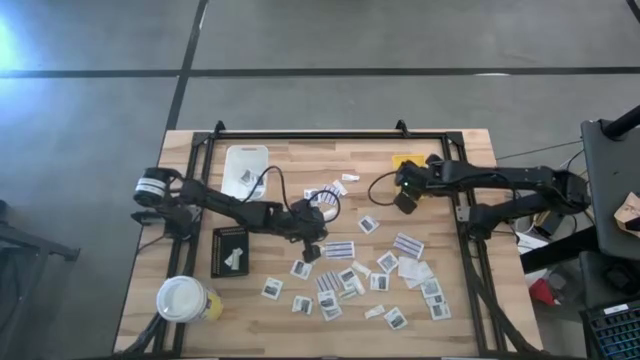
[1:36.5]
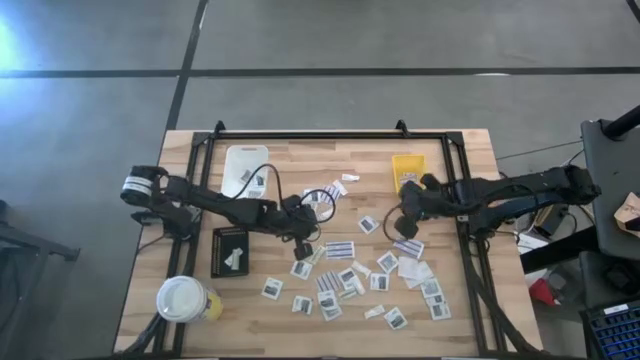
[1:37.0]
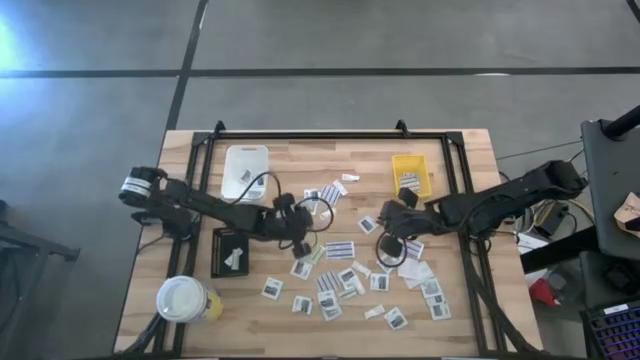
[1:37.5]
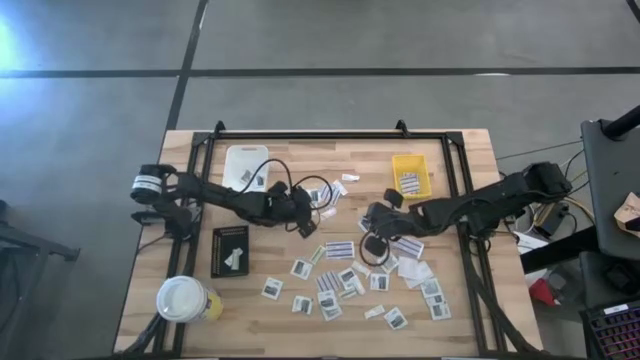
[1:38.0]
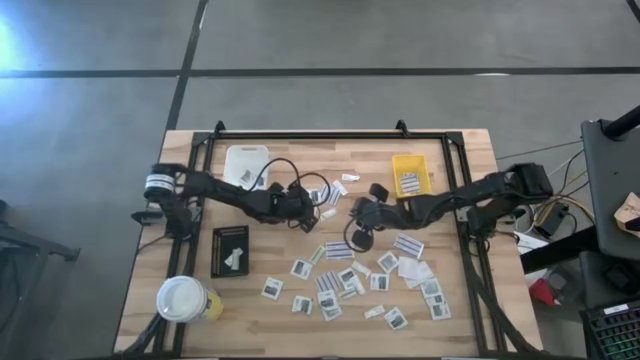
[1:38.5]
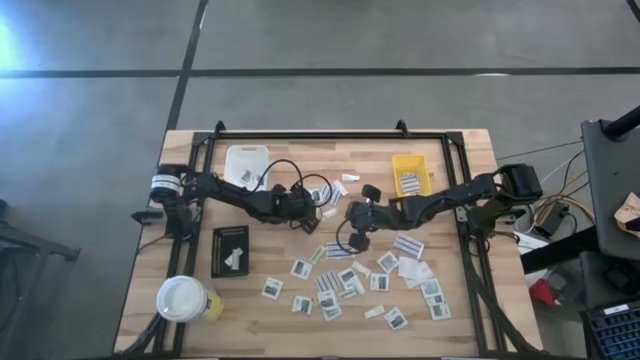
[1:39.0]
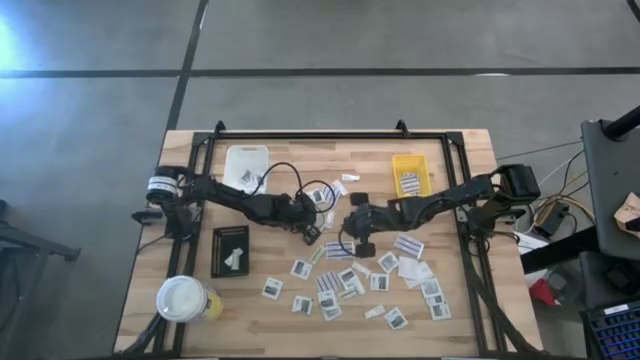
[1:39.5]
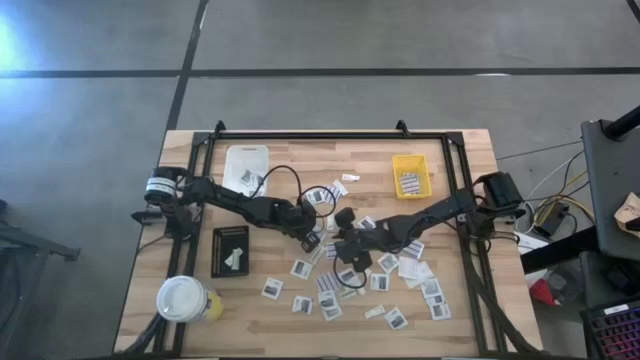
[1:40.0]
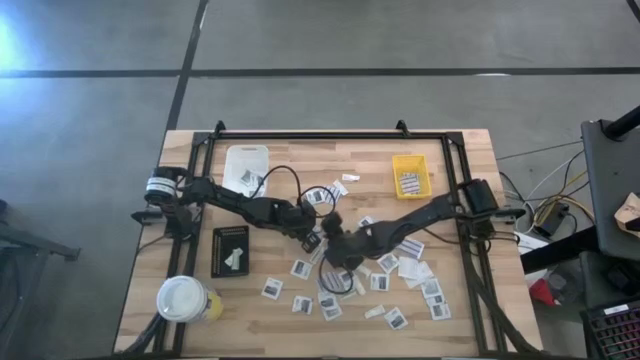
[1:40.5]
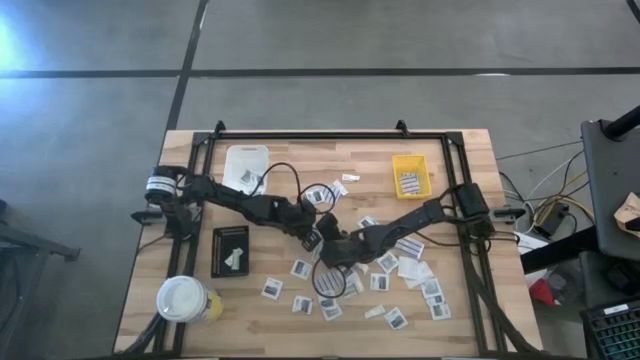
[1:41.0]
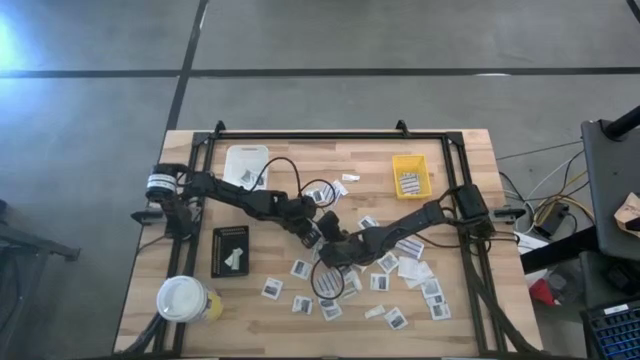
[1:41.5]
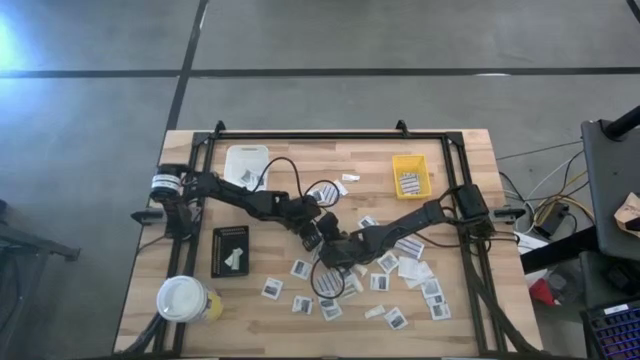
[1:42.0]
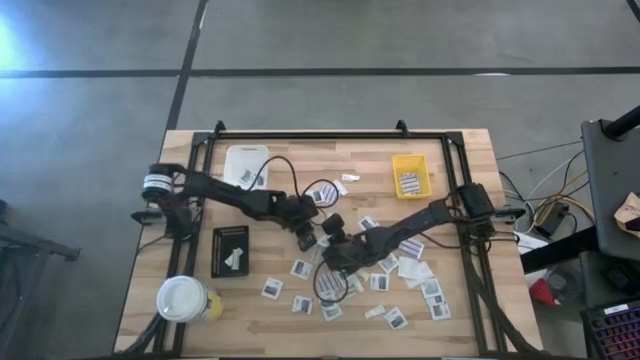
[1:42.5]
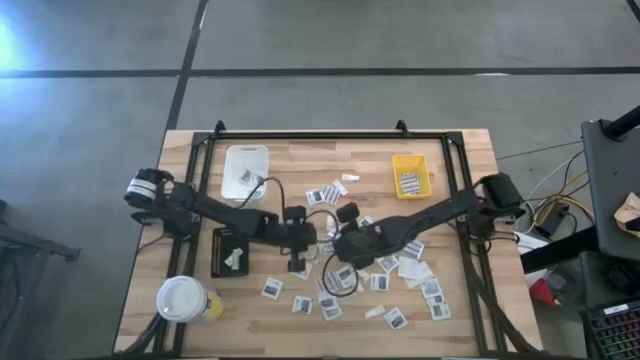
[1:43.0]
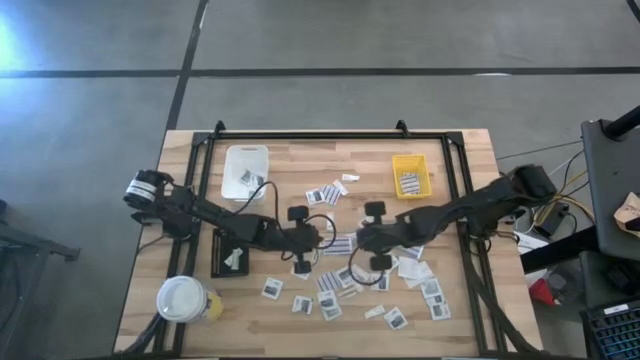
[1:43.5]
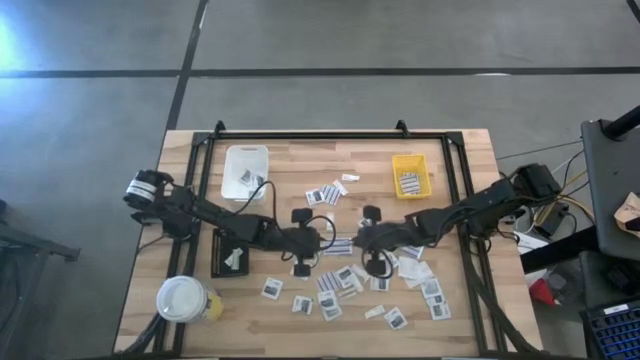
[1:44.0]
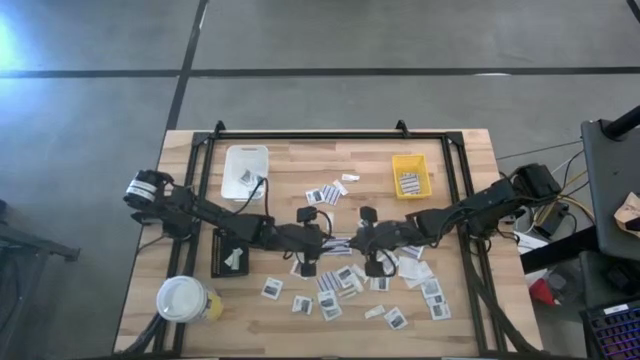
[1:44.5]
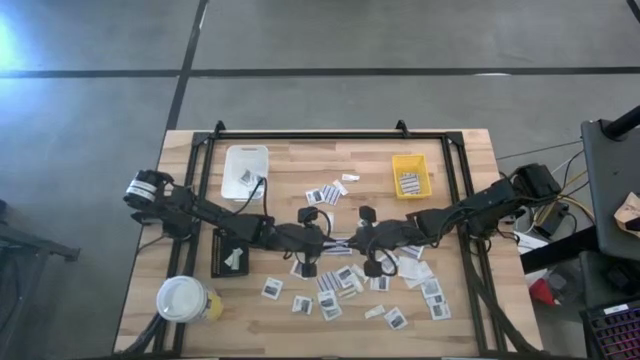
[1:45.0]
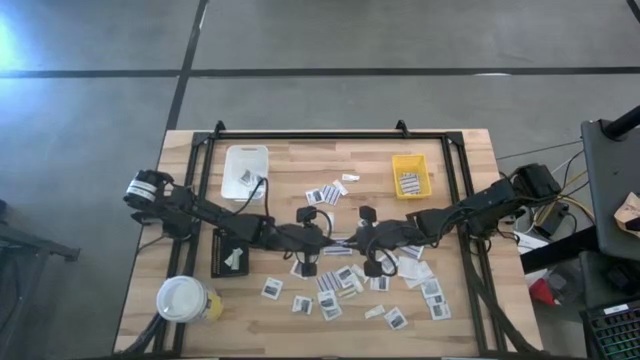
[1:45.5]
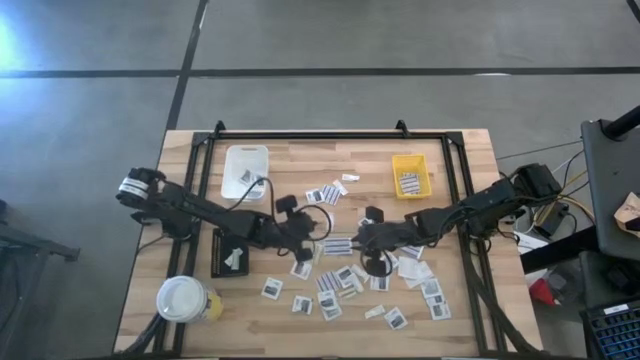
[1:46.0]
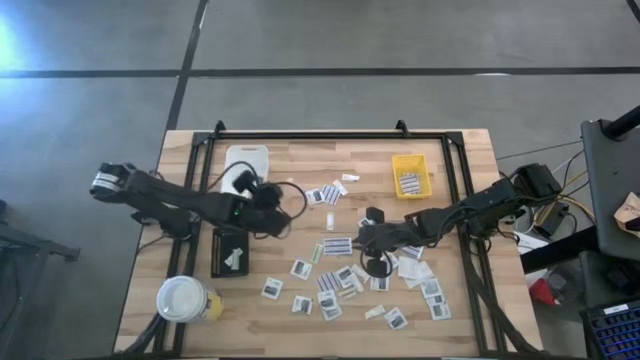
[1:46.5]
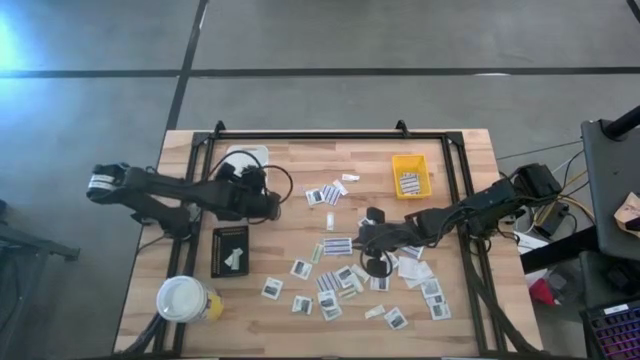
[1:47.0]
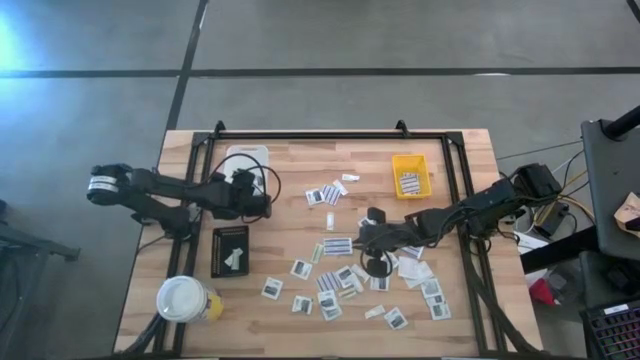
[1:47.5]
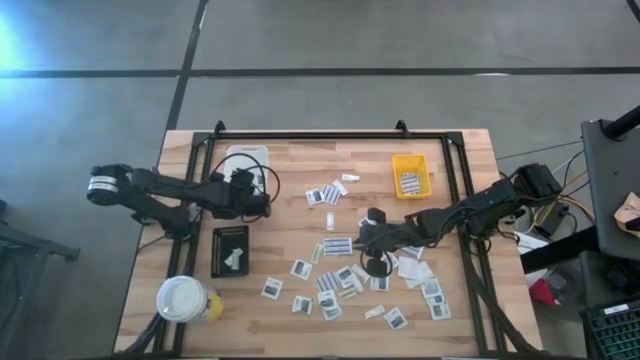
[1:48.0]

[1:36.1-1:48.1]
Task: Pick & Place First Aid Supplies
Put the gray towelette pack into the white bin

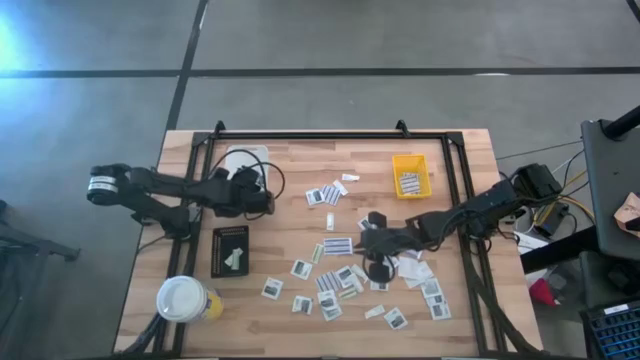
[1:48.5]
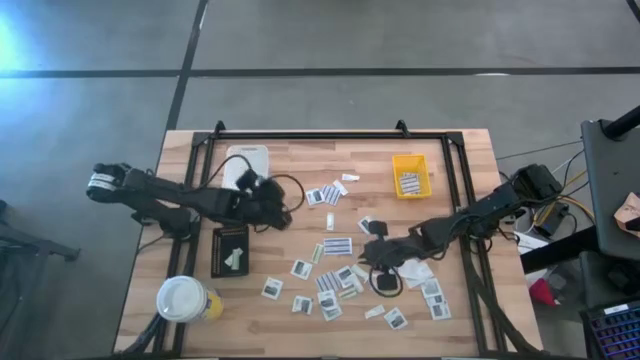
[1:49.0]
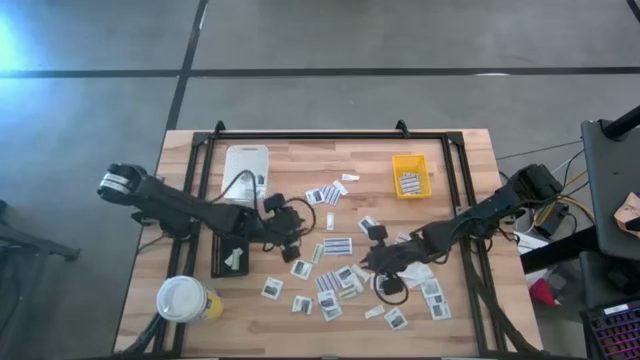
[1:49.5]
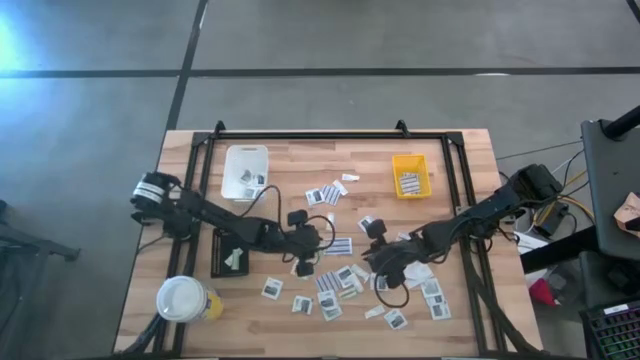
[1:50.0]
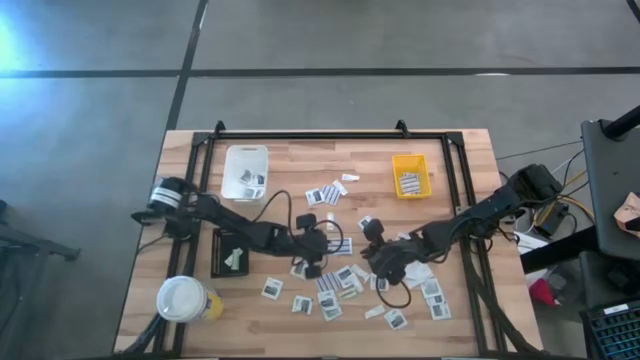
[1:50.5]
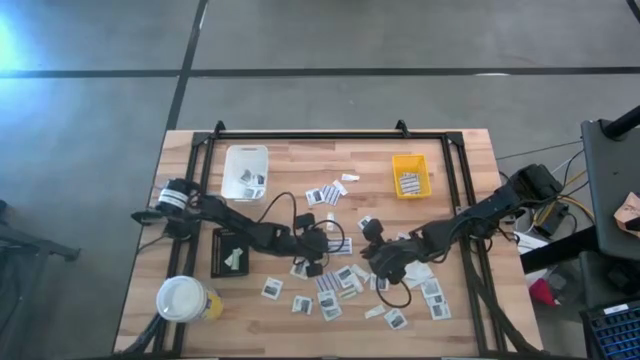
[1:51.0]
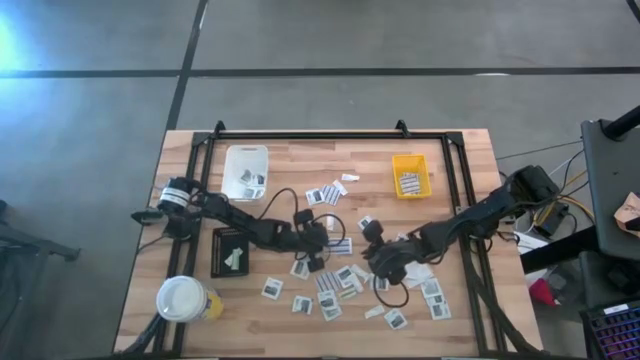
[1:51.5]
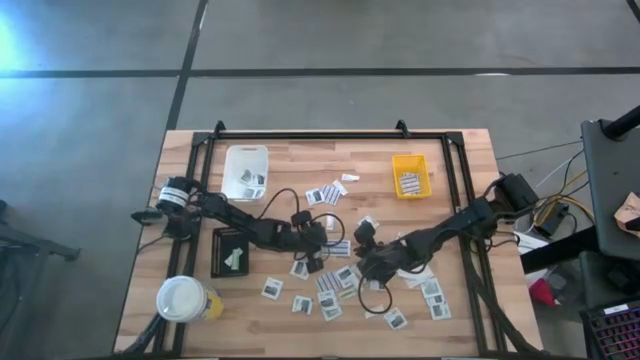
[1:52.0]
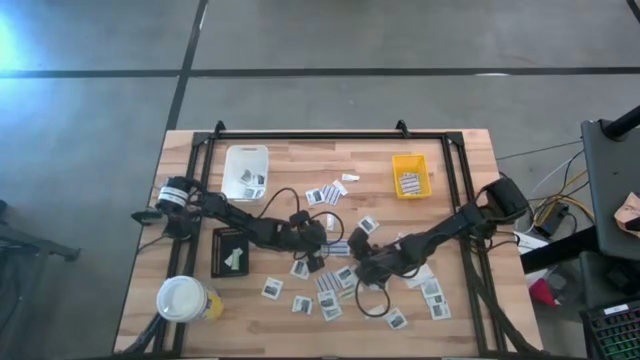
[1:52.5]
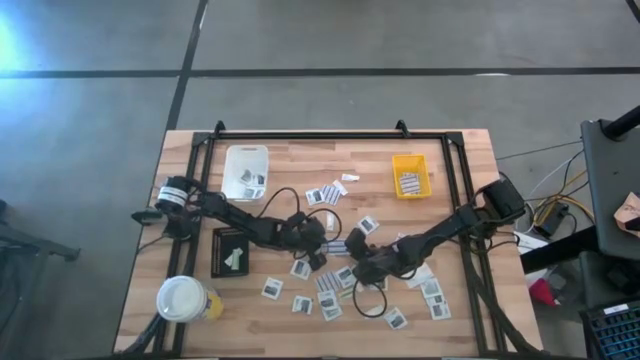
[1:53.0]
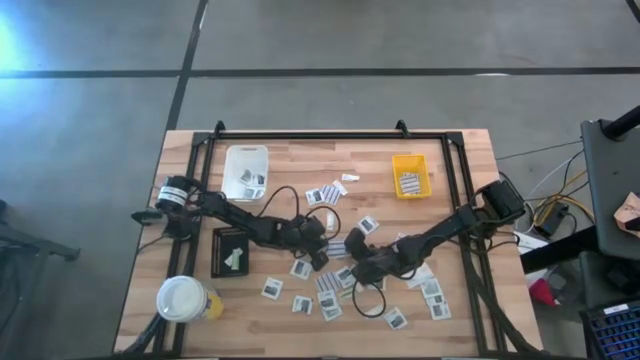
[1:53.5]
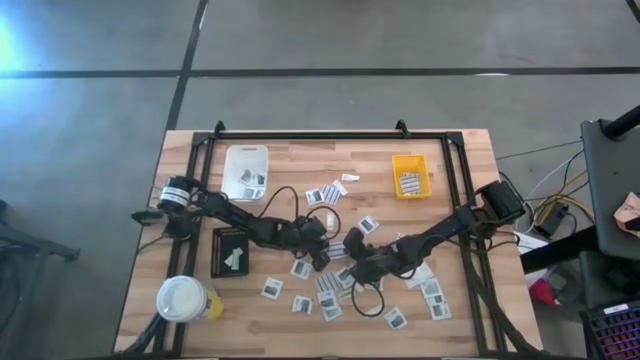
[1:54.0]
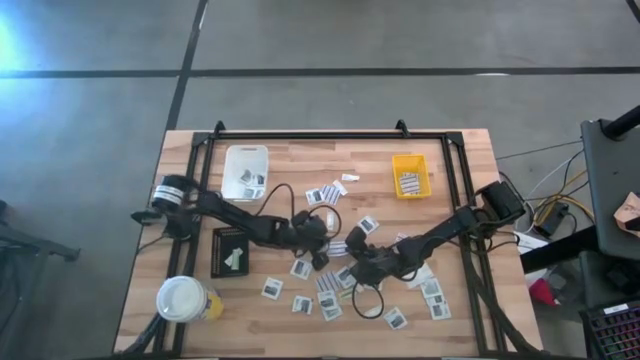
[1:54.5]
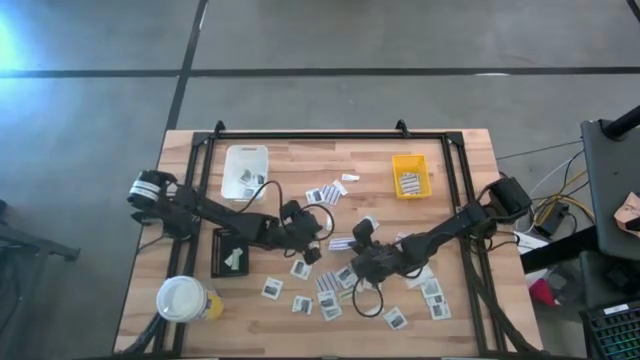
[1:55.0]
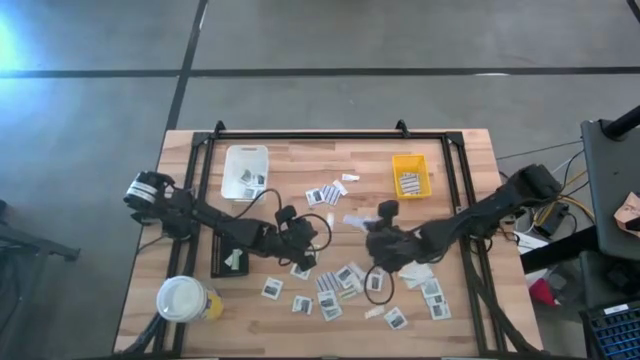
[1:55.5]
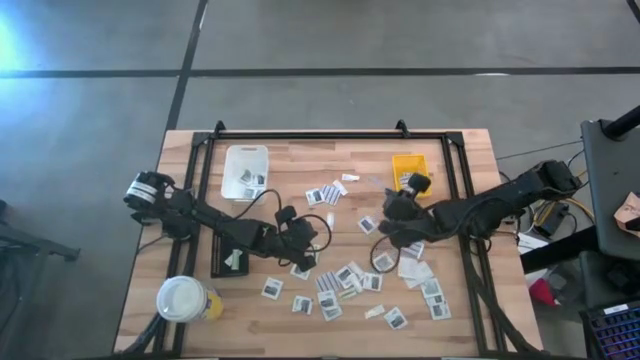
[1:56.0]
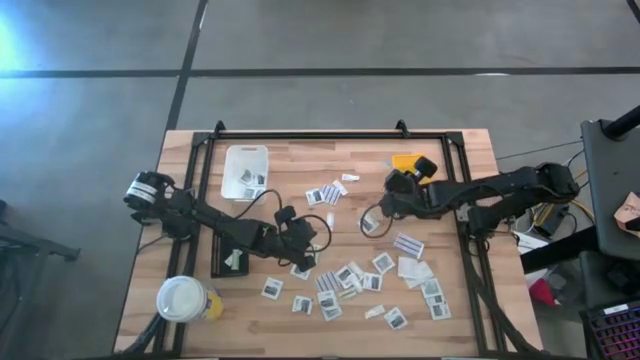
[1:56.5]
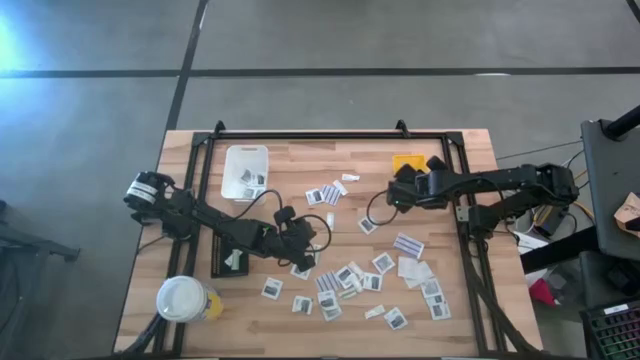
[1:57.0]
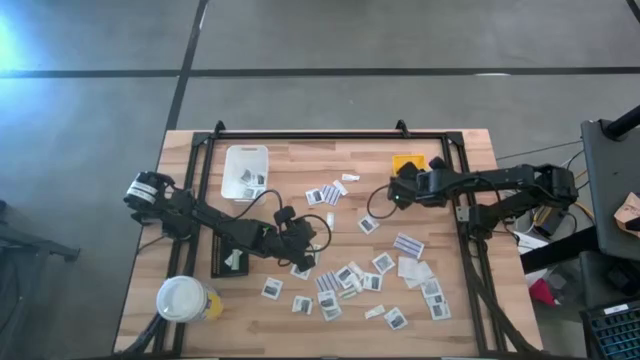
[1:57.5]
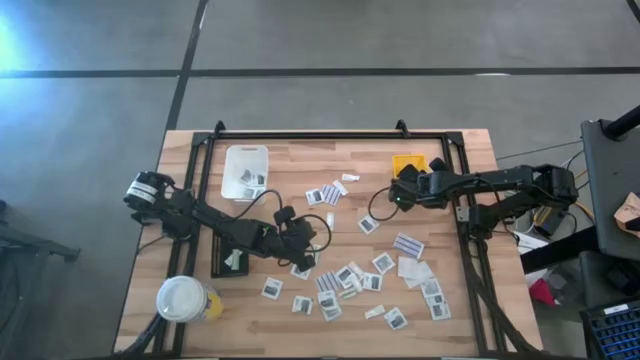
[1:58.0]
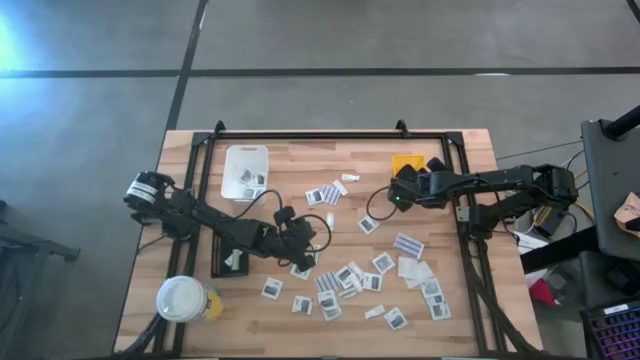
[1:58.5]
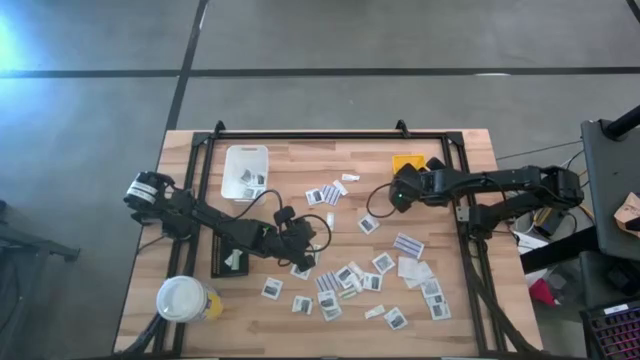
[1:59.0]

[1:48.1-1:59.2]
Put the blue bandage pack into the yellow bin
